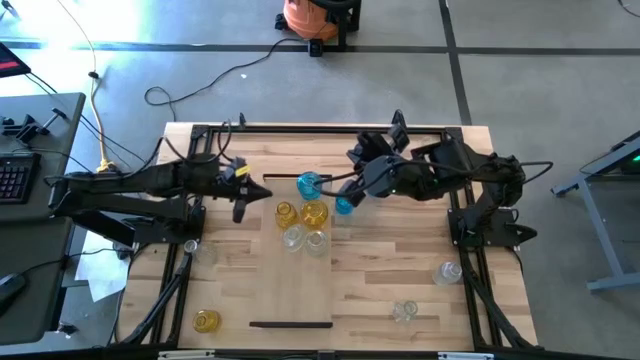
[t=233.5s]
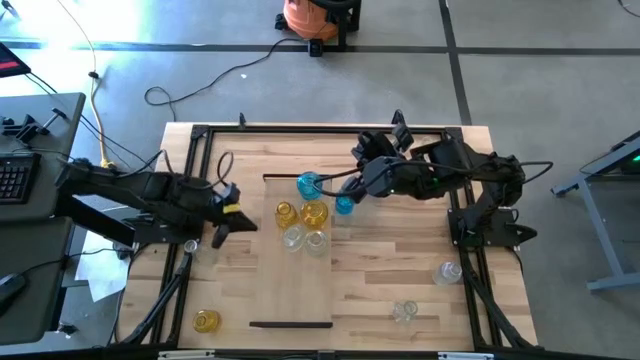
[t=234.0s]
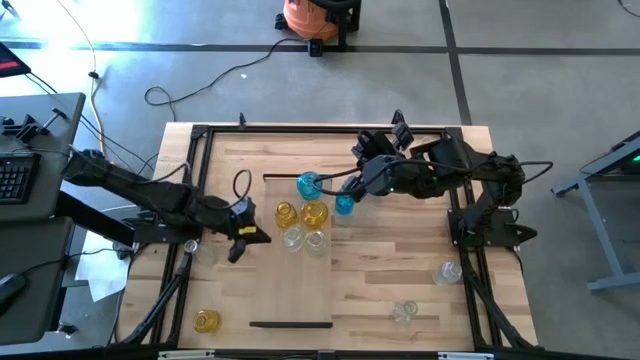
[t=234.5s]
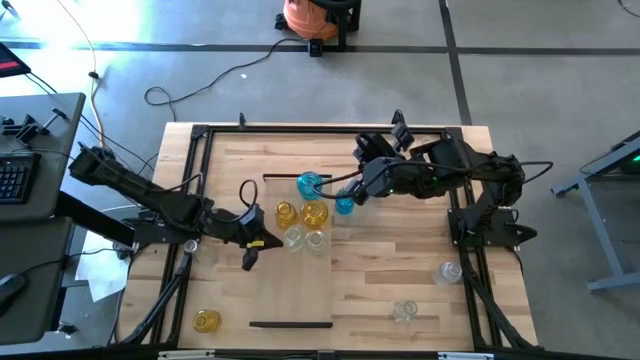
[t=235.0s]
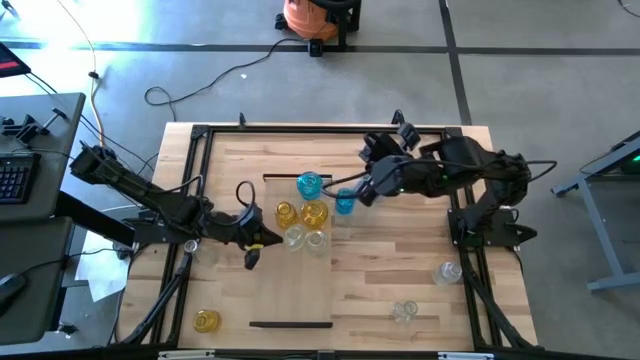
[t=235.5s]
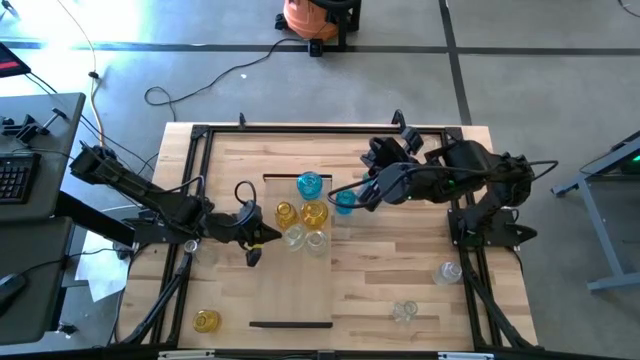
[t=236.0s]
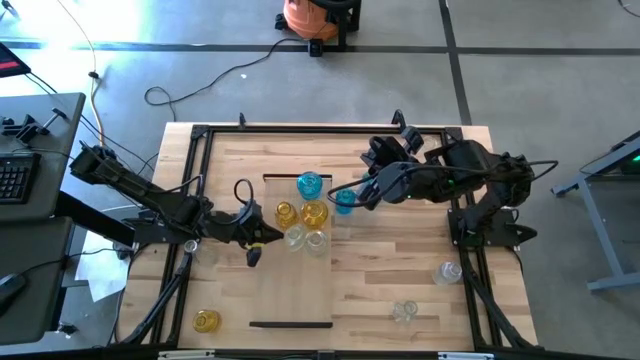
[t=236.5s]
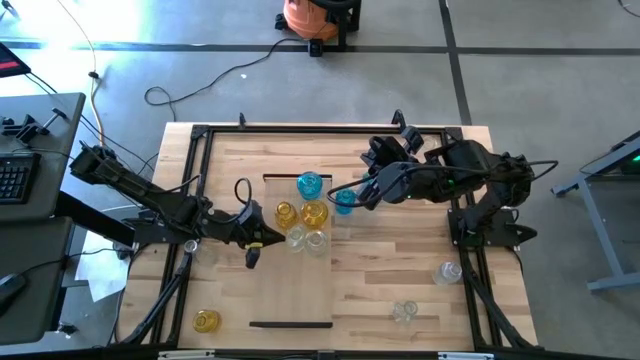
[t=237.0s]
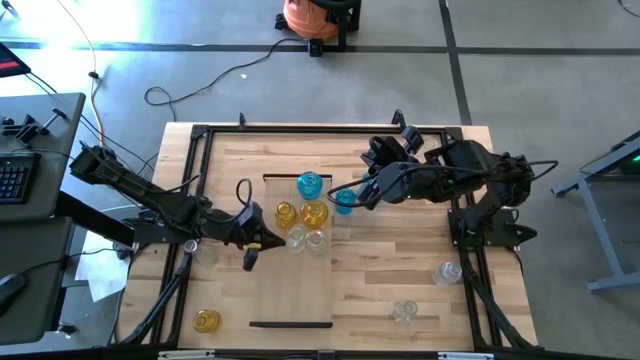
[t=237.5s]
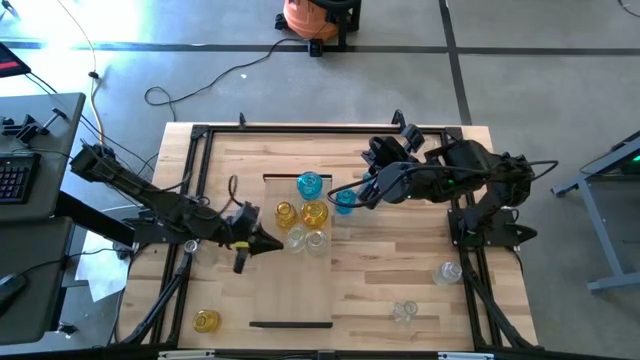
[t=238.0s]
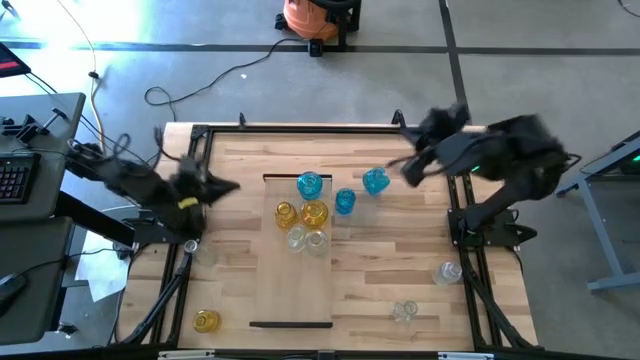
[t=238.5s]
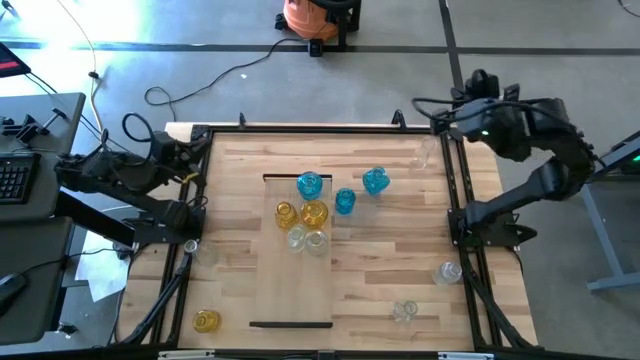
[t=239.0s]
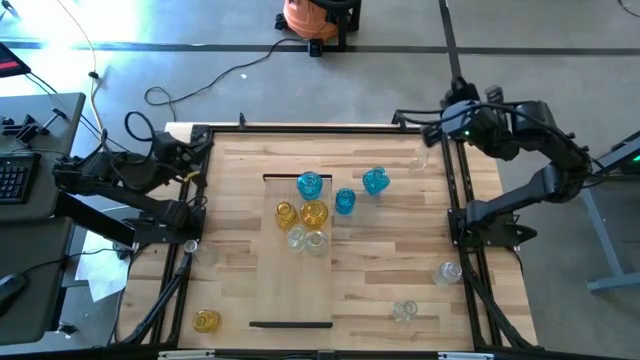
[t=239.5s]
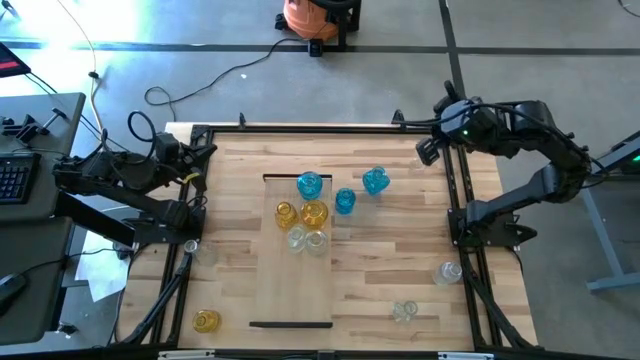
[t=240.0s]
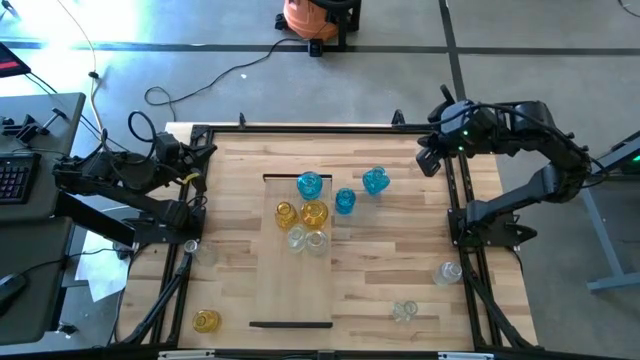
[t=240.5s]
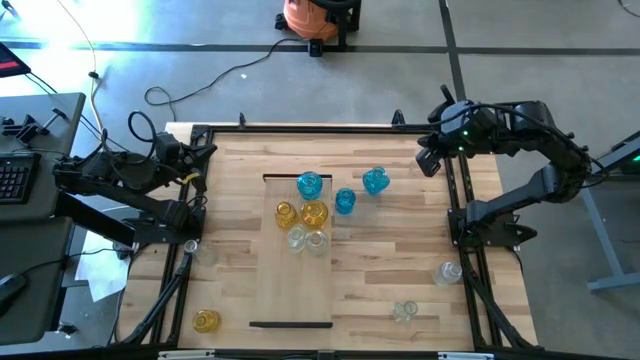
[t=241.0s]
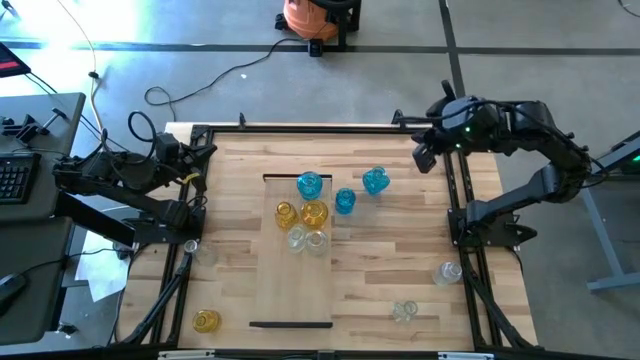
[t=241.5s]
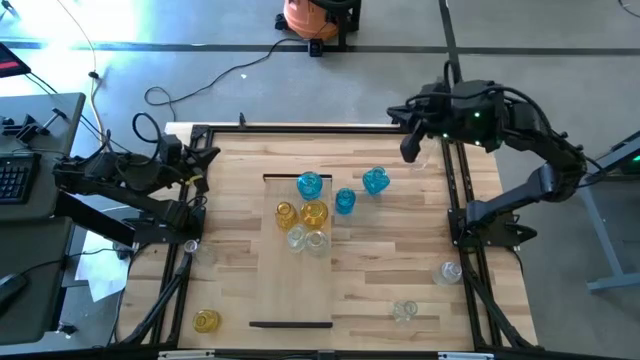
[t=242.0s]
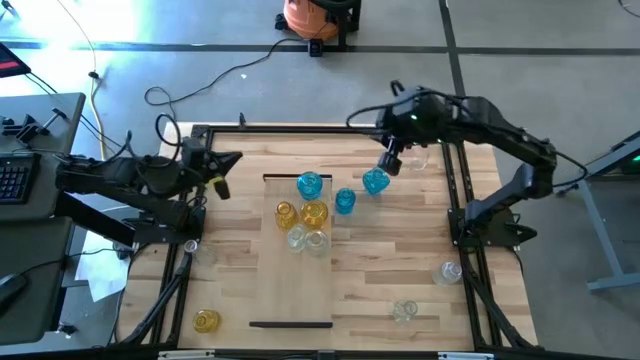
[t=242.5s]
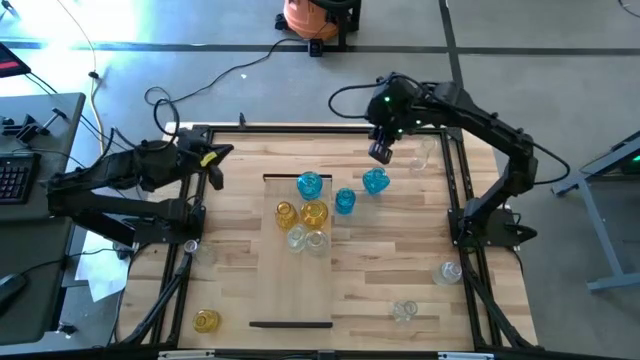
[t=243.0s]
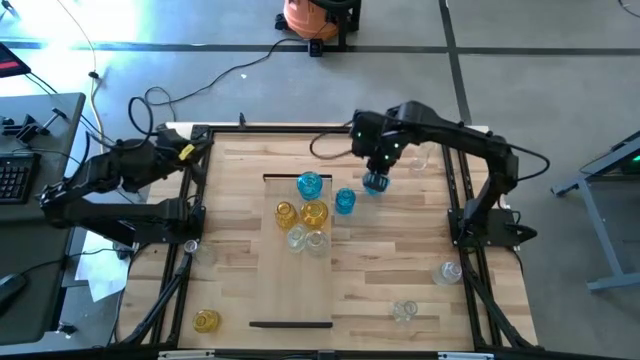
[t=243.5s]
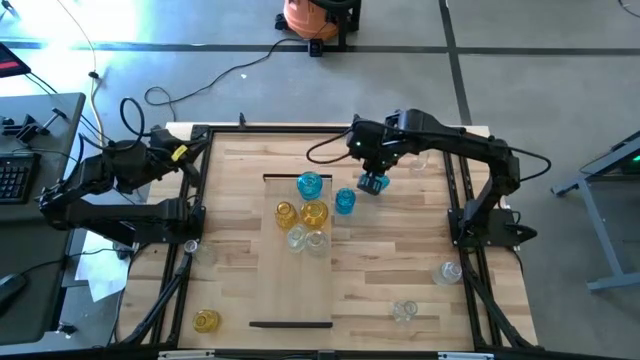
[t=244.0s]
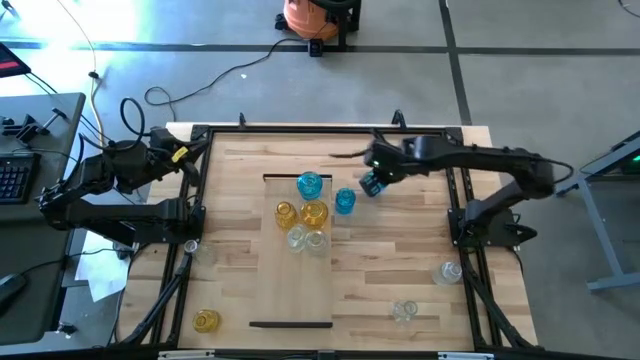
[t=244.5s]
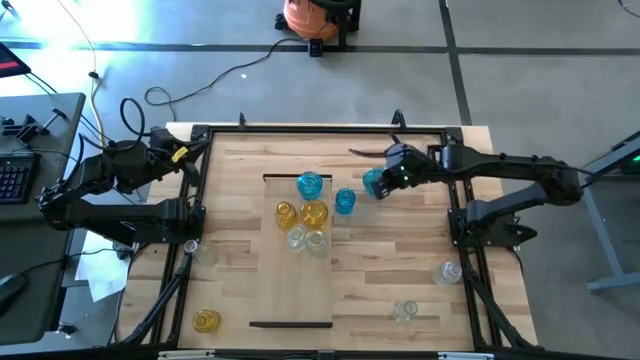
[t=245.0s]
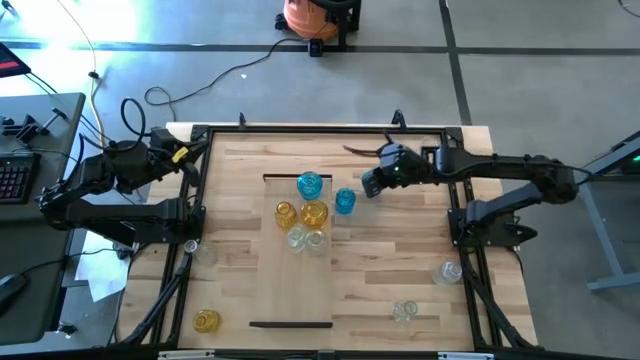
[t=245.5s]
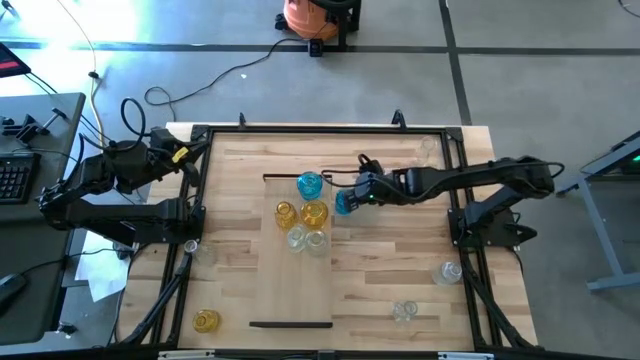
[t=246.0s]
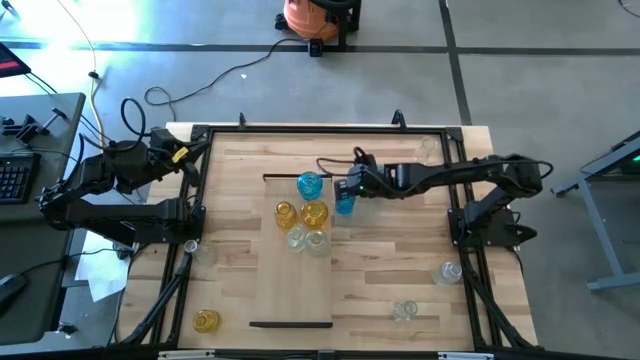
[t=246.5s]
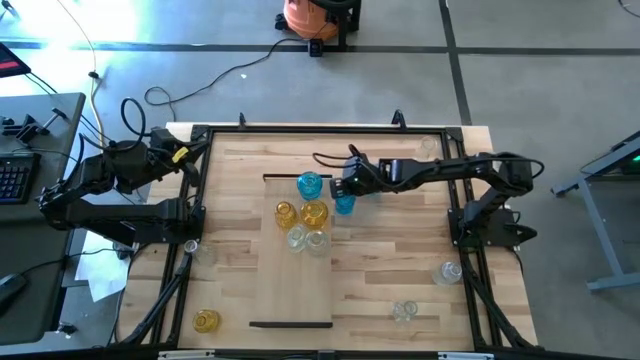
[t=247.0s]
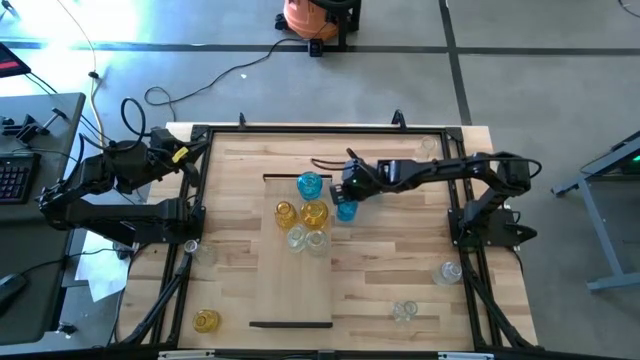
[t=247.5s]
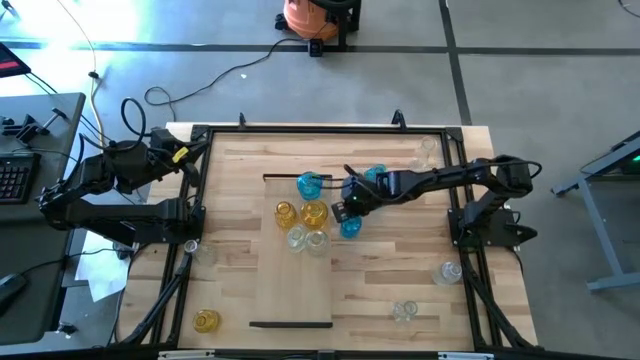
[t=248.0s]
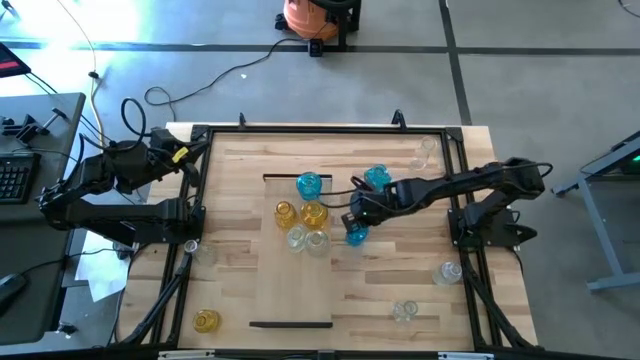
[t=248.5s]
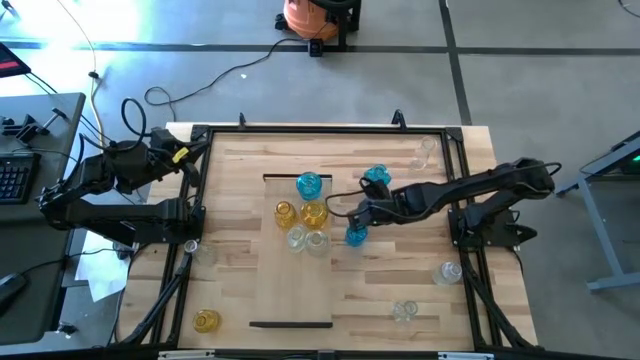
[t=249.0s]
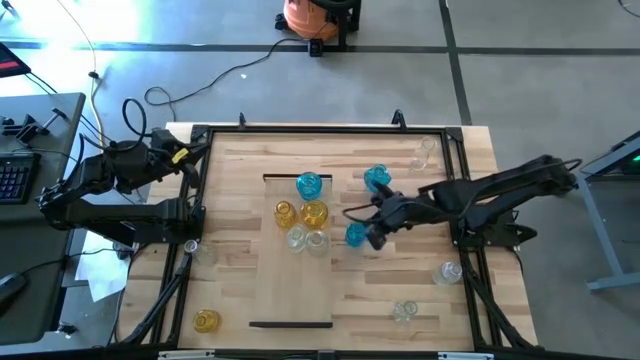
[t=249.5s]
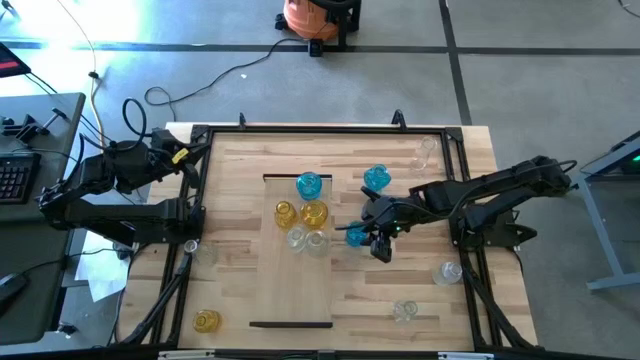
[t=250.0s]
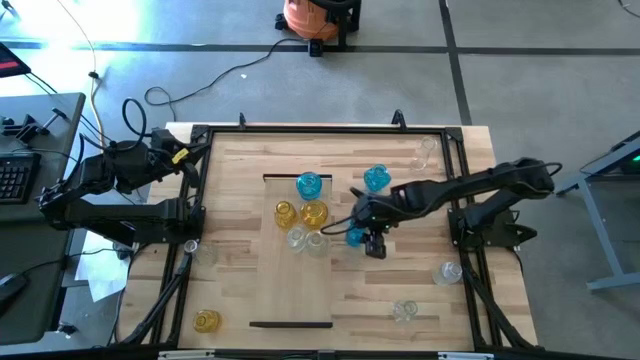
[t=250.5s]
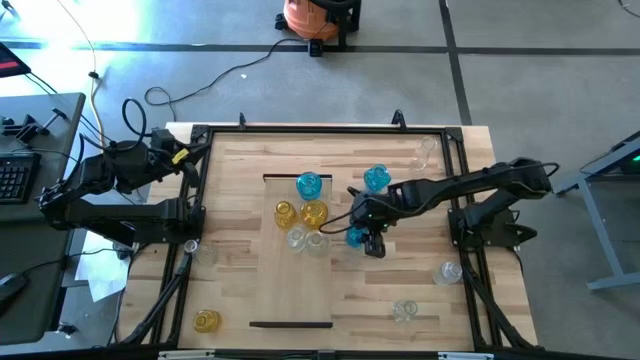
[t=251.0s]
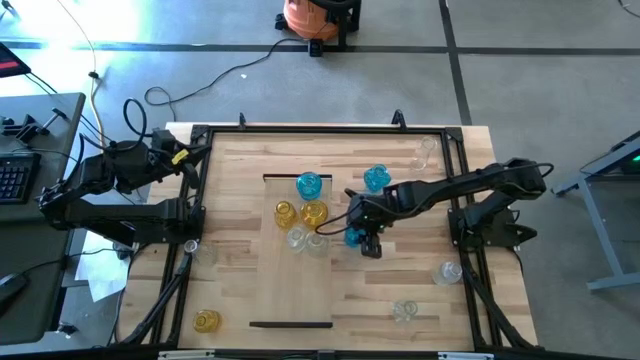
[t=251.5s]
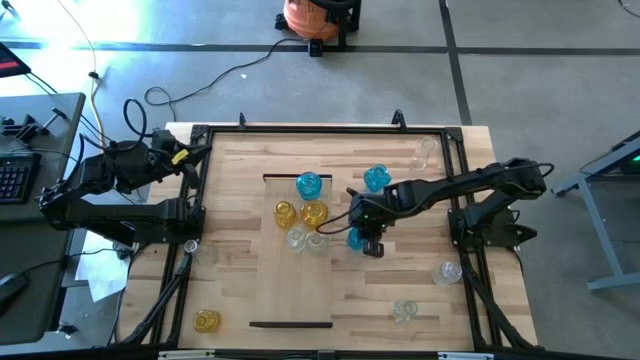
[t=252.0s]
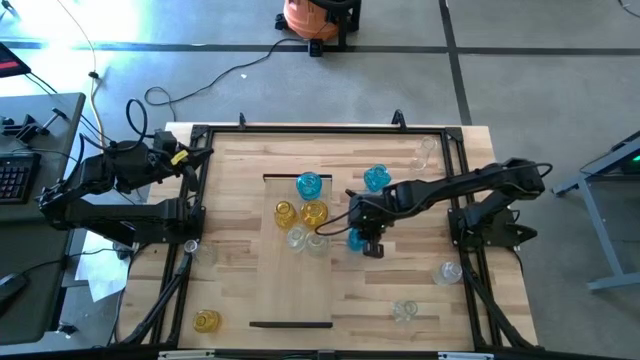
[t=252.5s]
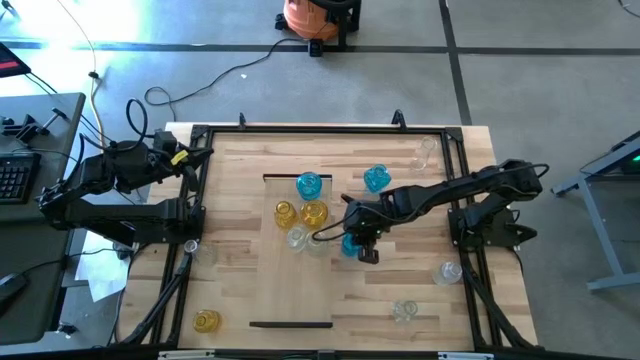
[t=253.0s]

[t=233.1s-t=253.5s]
Task: sort vases onto shelf
Put the bottom blue vase on the shelf to align with the other blue vase

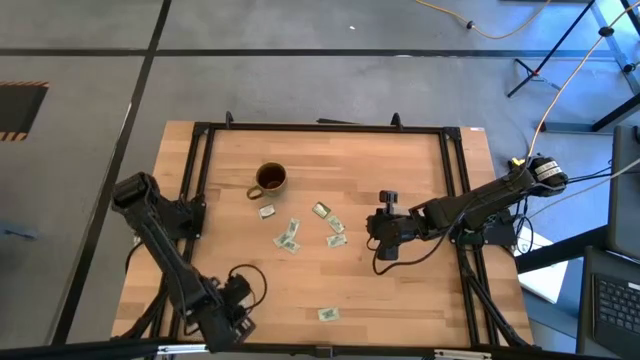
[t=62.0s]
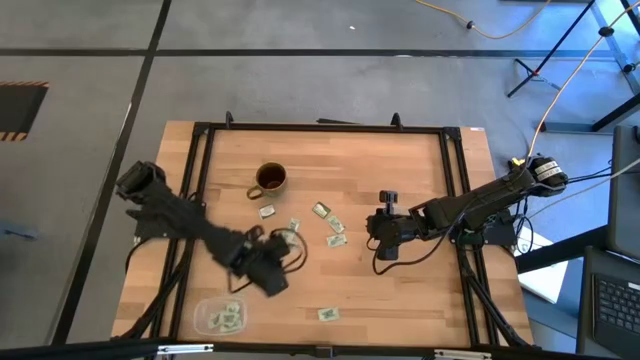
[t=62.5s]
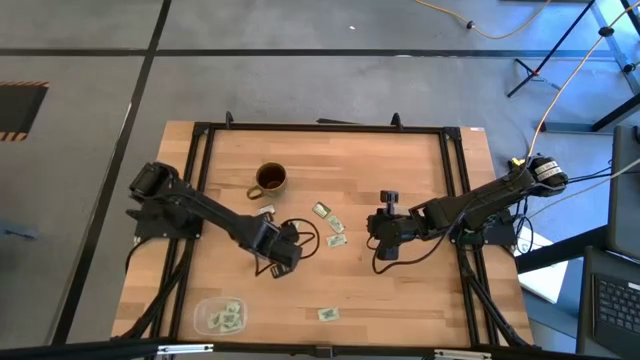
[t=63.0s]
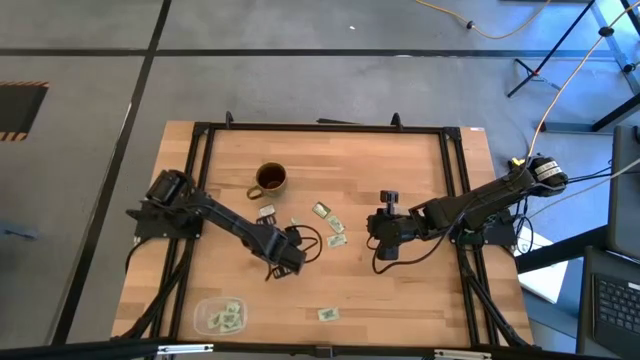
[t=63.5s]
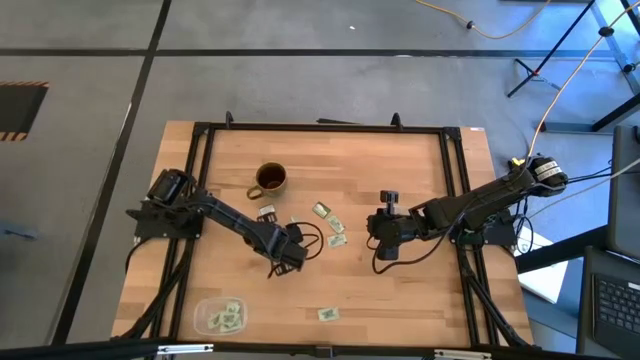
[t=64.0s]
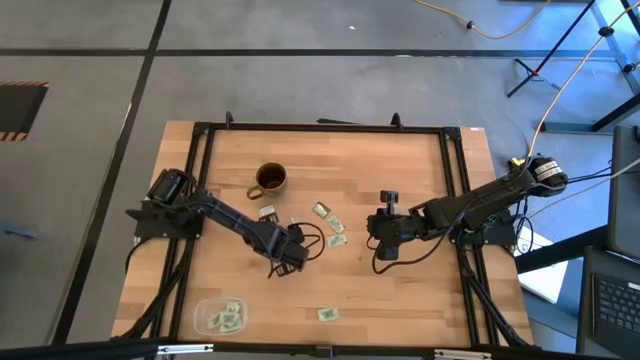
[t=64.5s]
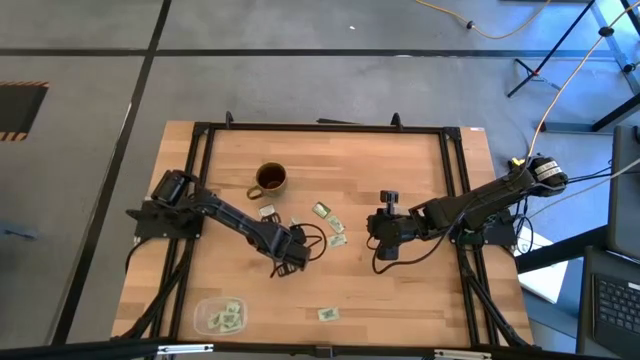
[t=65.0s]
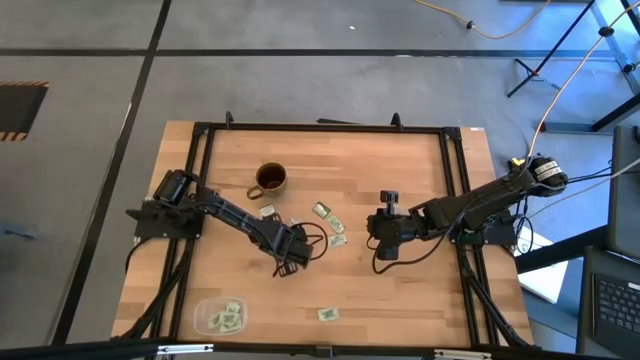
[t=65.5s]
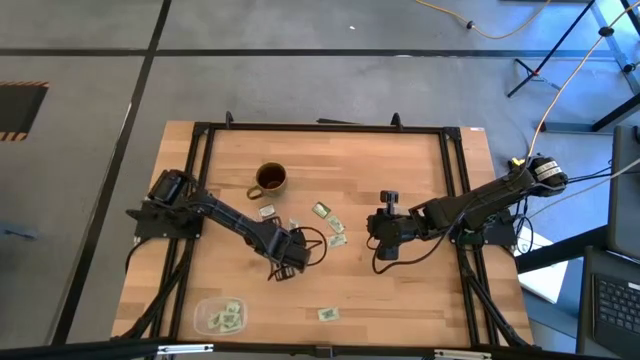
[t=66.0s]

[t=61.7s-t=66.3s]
Task: Pick and place Stevia / Truvia into bins
Put the stevia packet into the bottom transparent container
